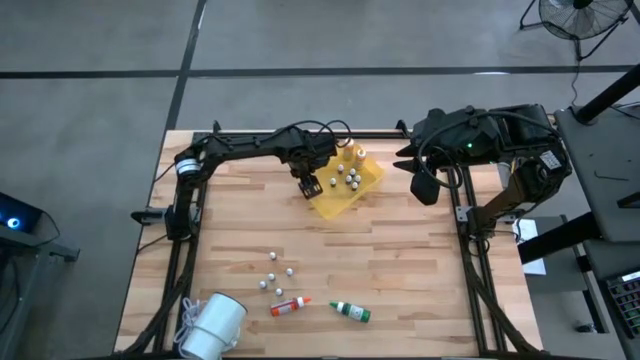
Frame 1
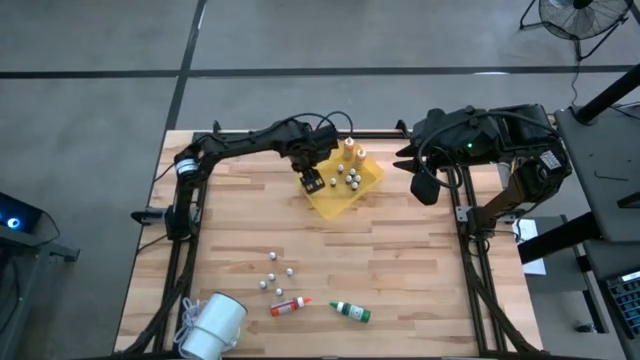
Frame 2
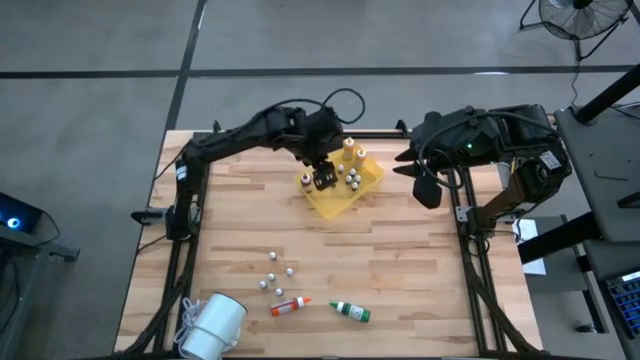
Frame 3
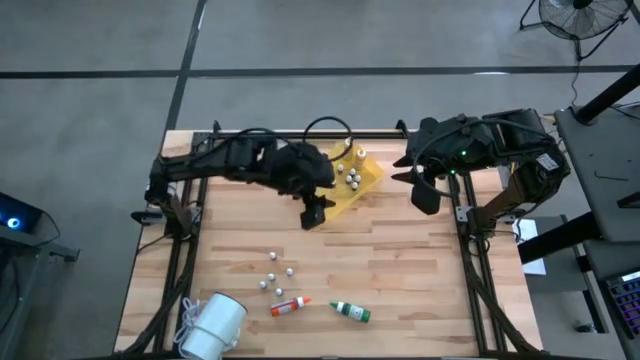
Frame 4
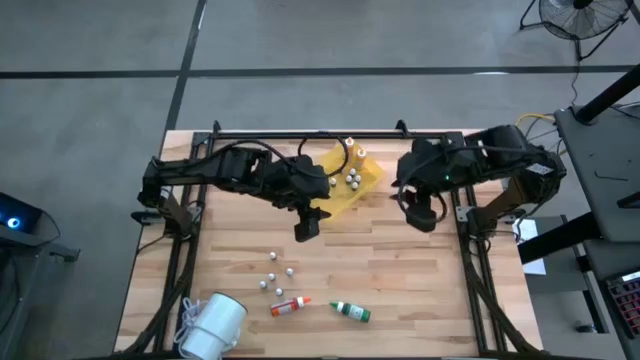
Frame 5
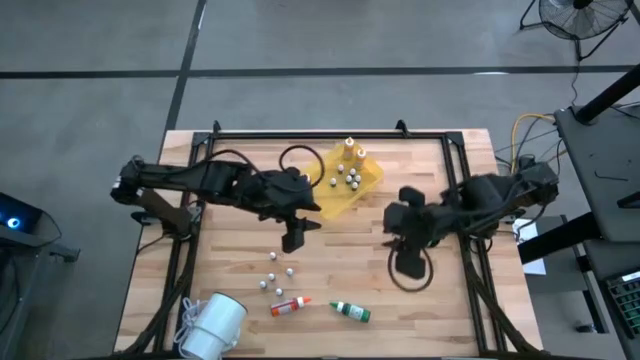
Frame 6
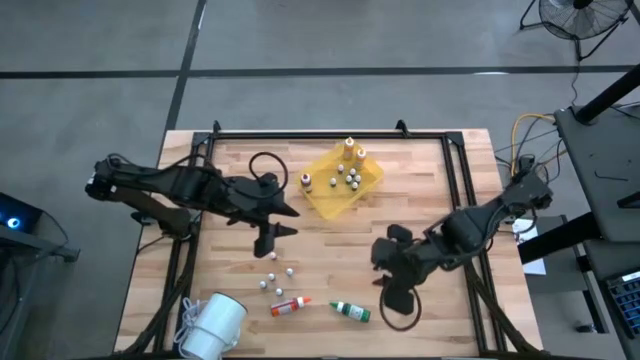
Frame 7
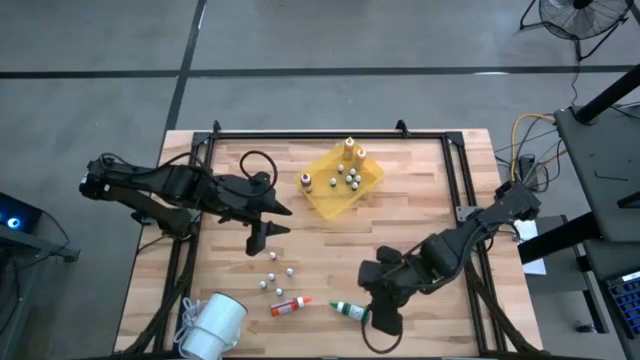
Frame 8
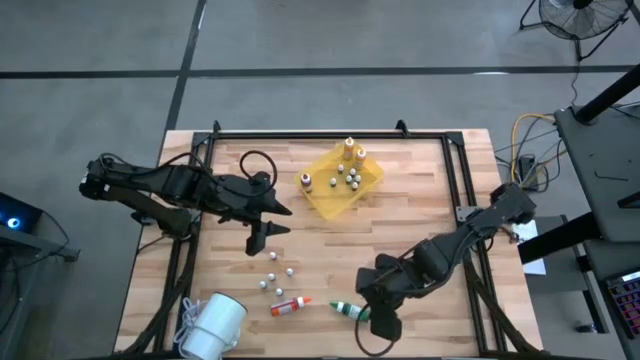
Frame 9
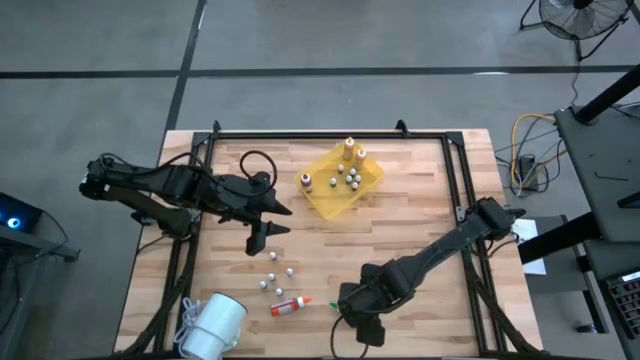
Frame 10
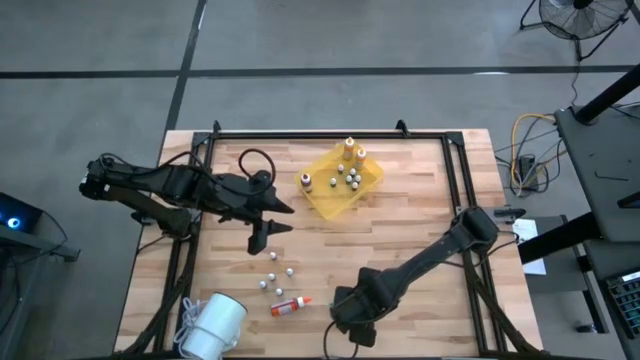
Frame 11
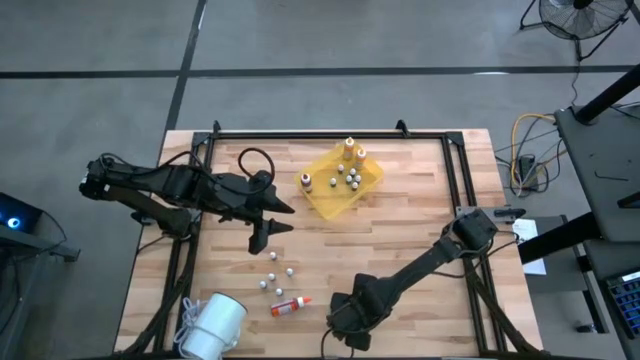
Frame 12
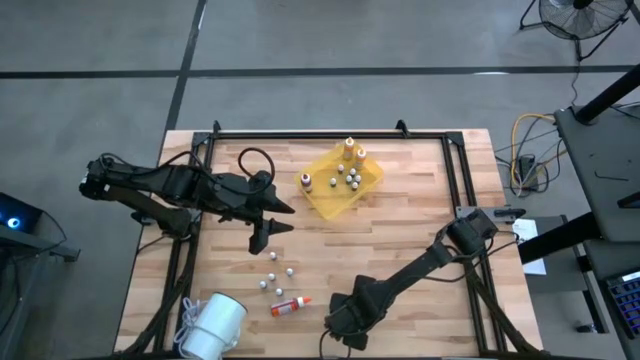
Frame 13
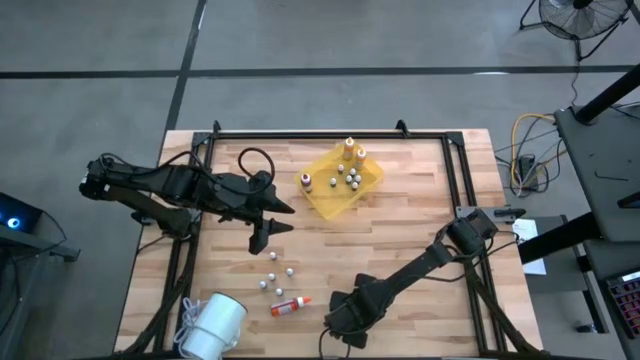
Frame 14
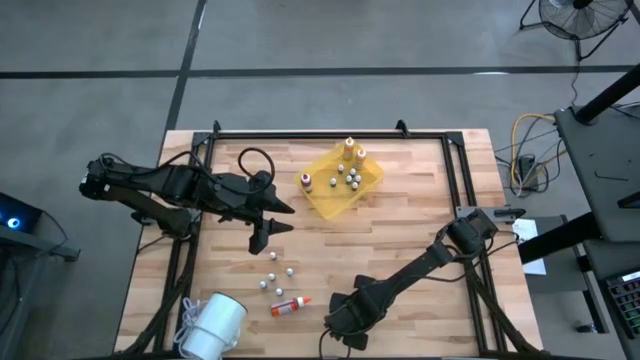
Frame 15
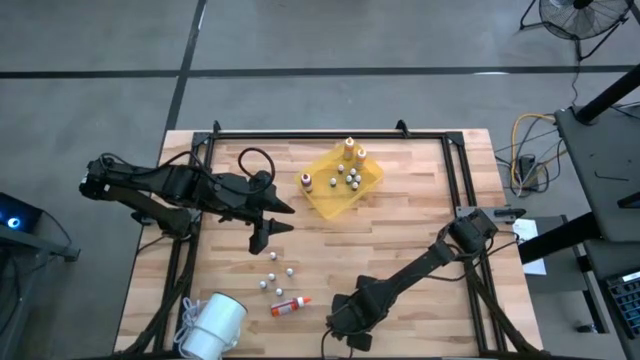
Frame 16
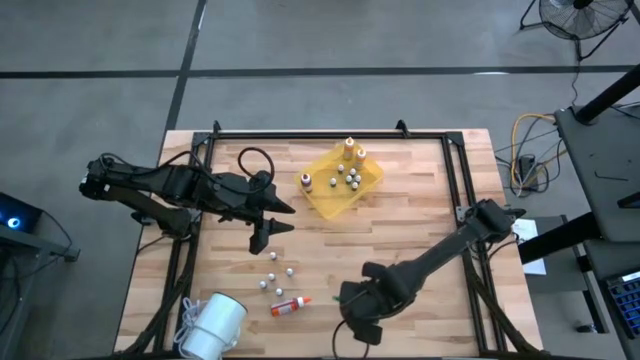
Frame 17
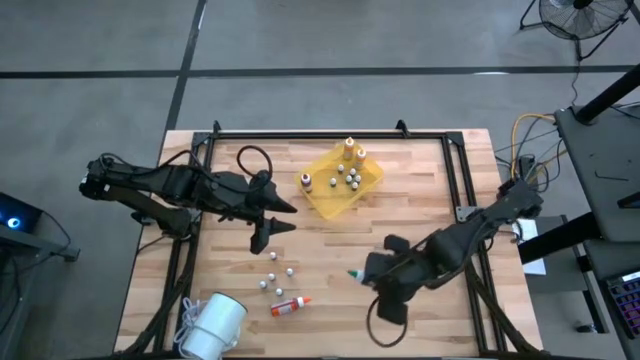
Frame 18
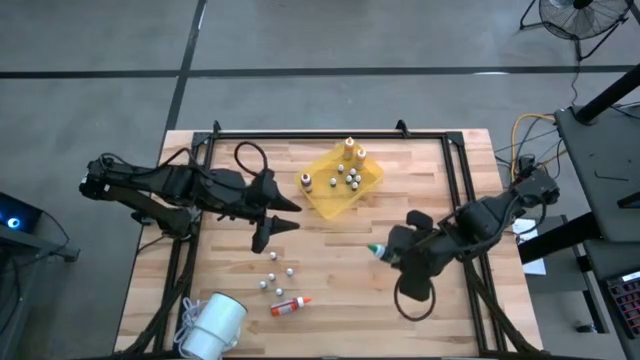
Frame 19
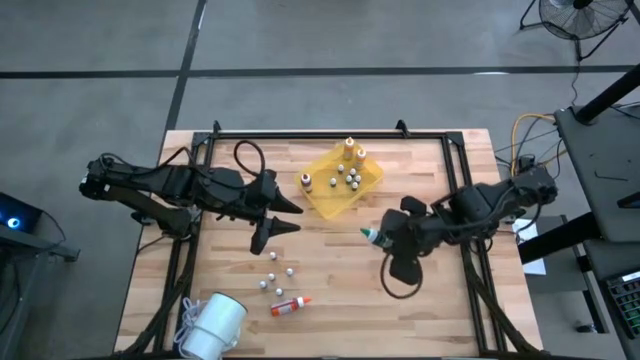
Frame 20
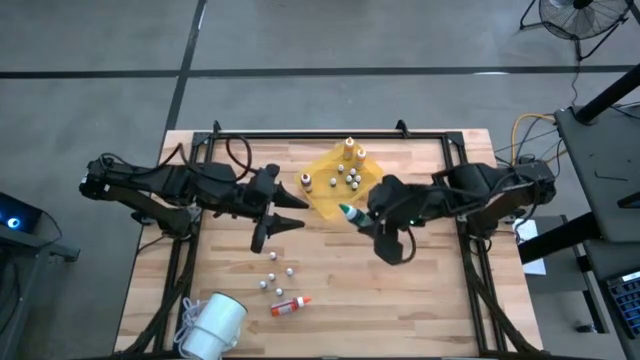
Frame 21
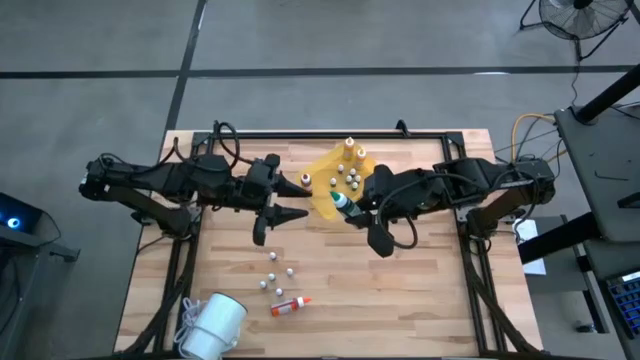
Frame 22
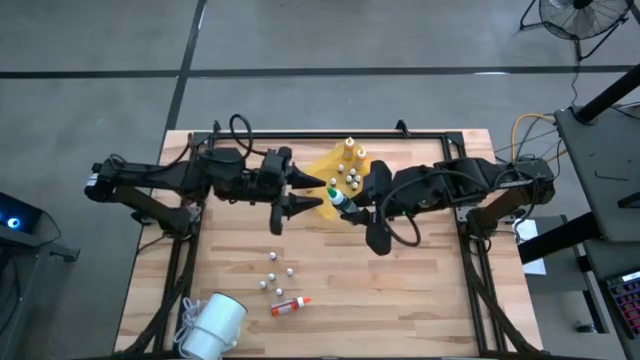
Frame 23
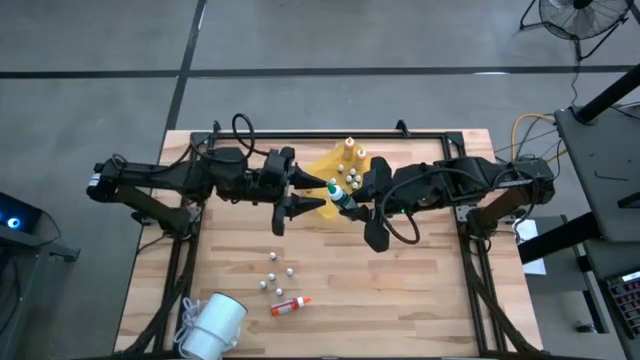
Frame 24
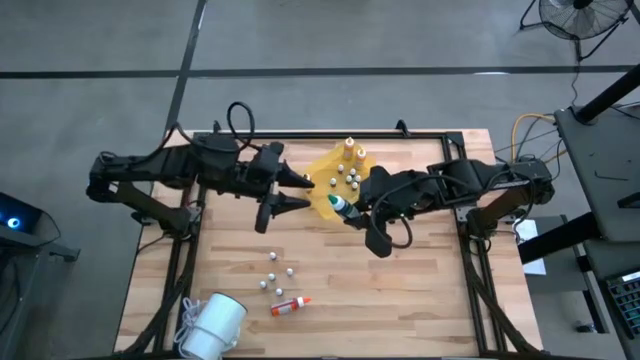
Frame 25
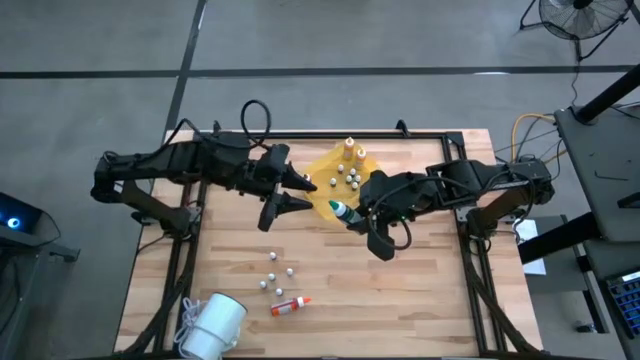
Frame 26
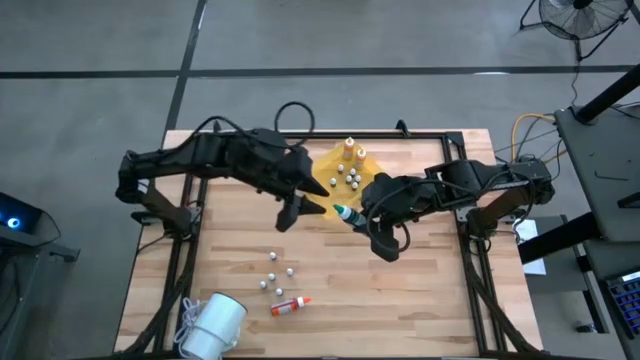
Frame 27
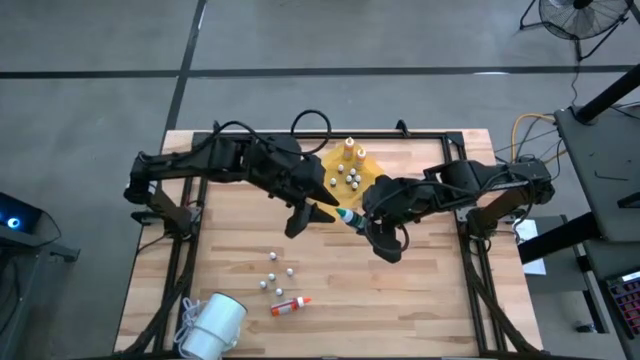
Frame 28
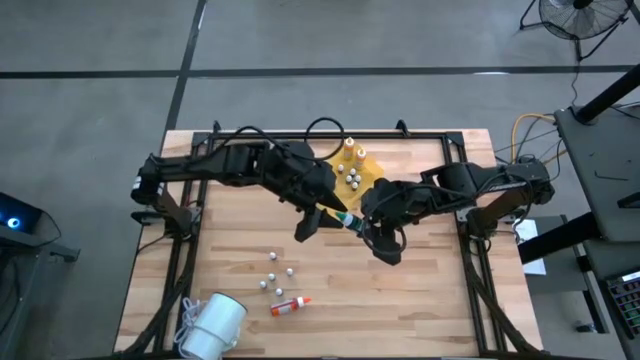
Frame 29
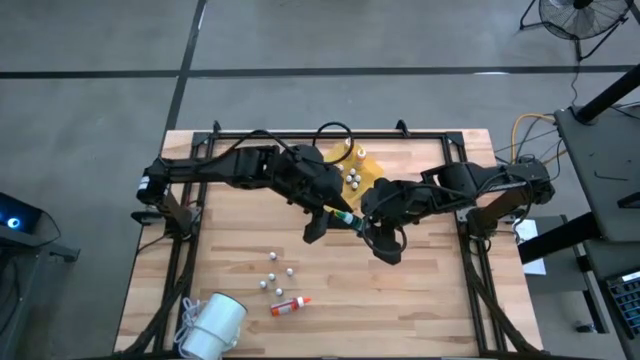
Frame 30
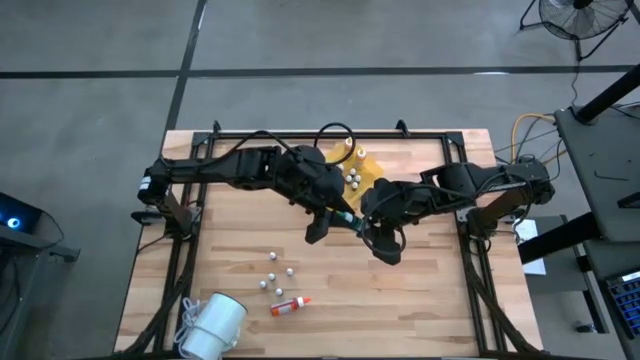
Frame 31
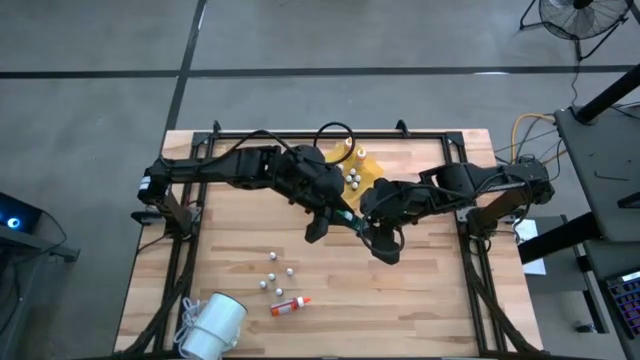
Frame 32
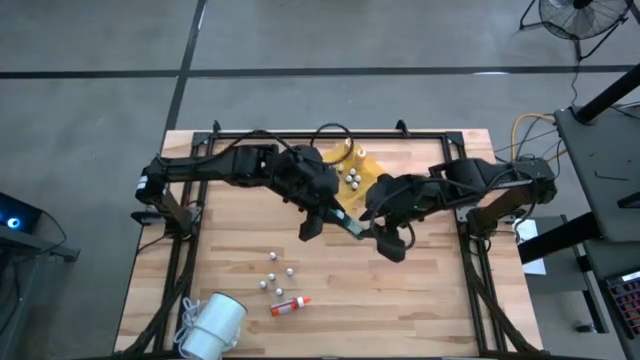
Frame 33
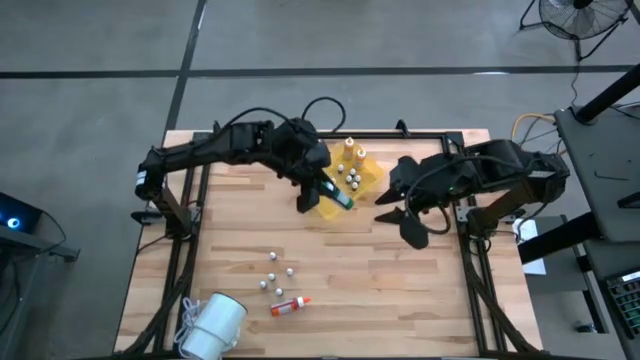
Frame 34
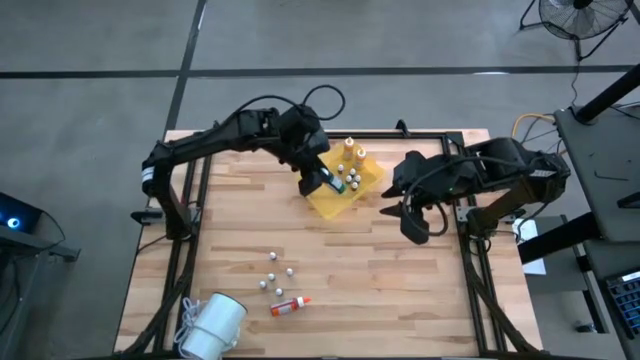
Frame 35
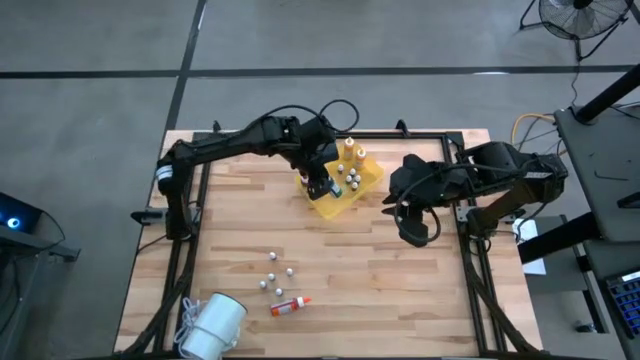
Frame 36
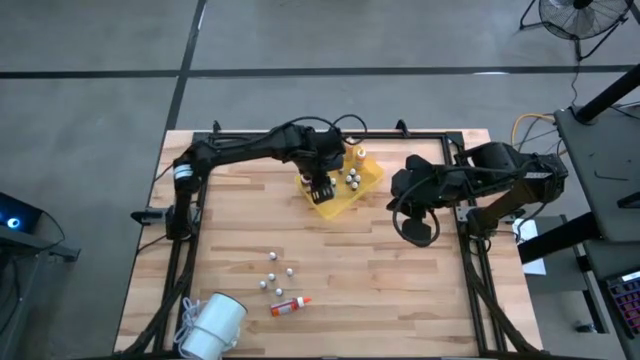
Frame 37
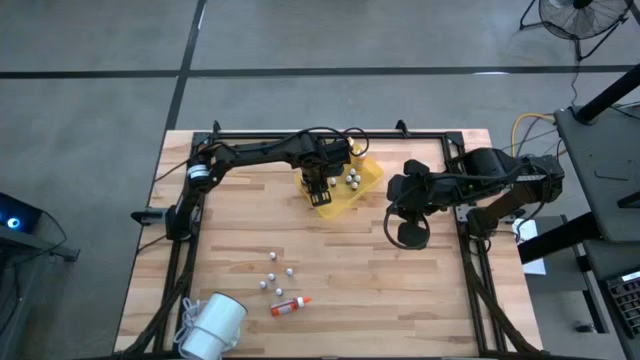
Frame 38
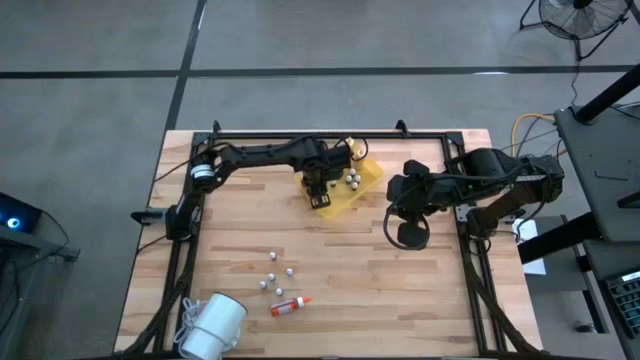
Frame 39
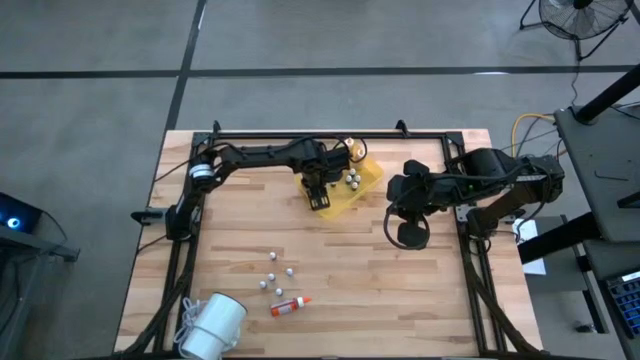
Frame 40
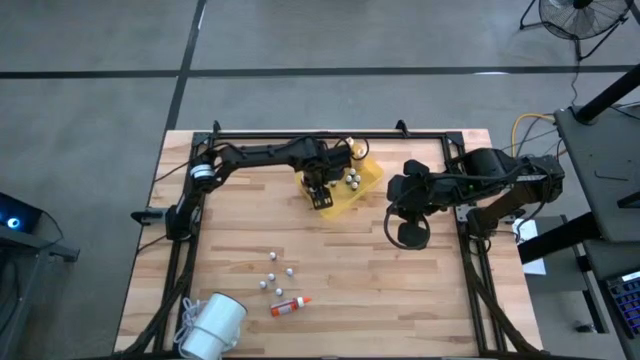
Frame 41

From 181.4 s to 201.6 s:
Task: Pick & Place food coloring
Put the large green food coloring bottle into the yellow bin
